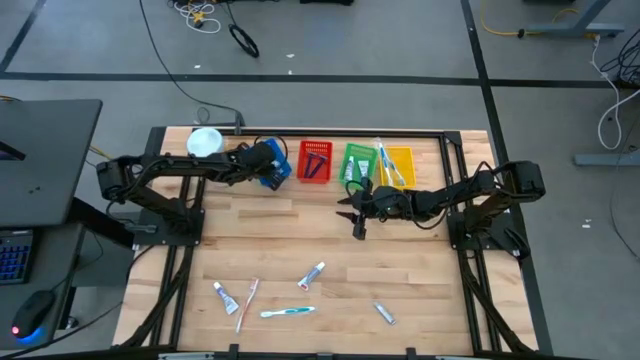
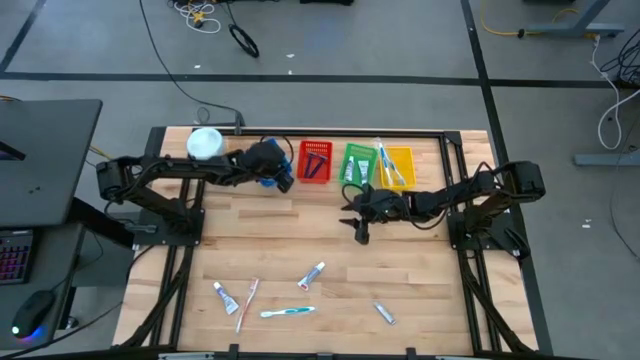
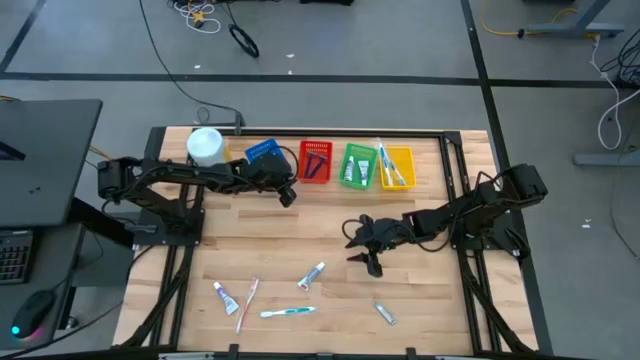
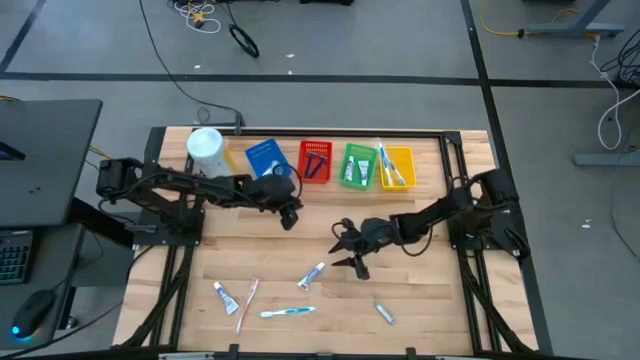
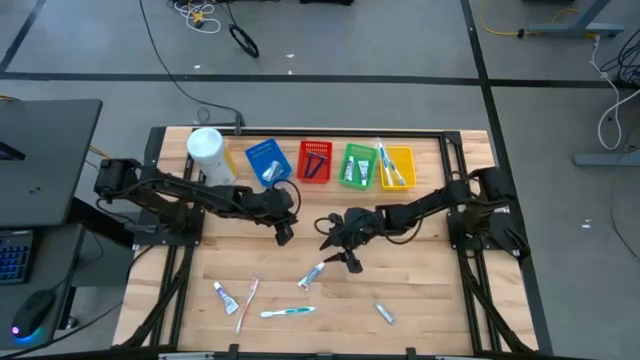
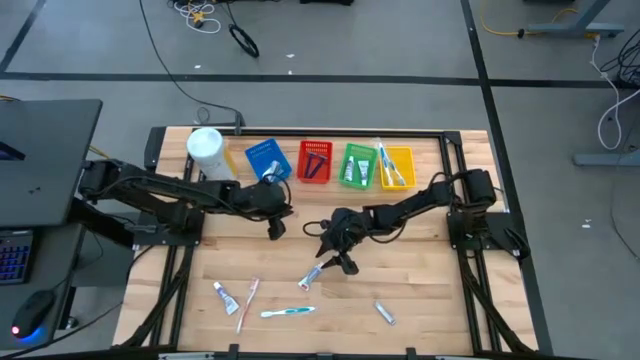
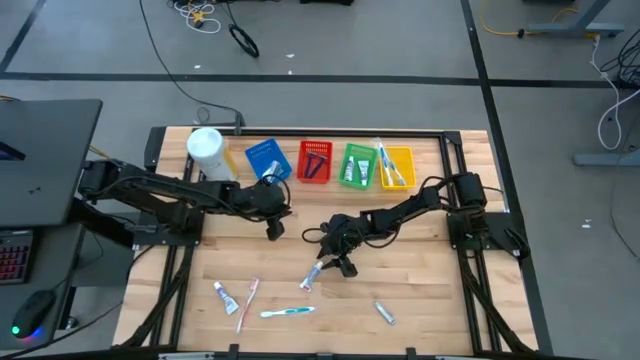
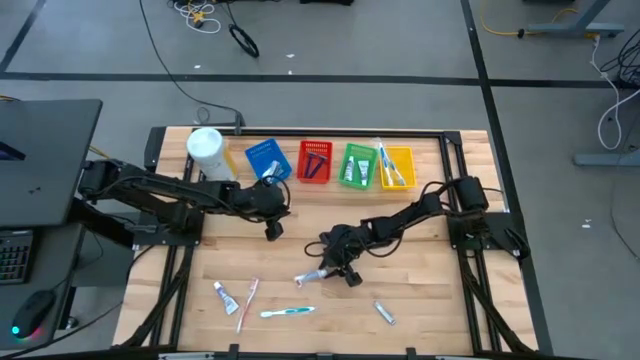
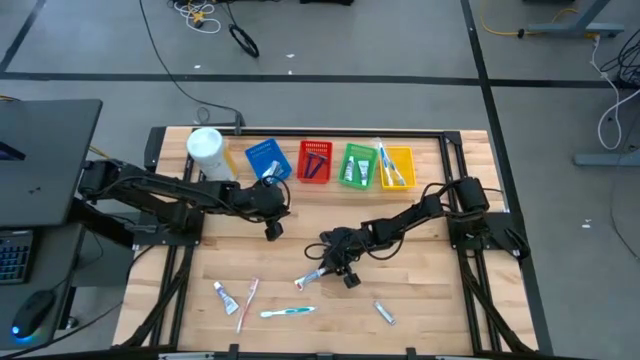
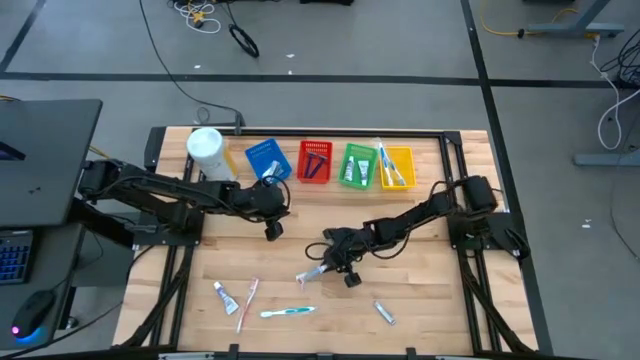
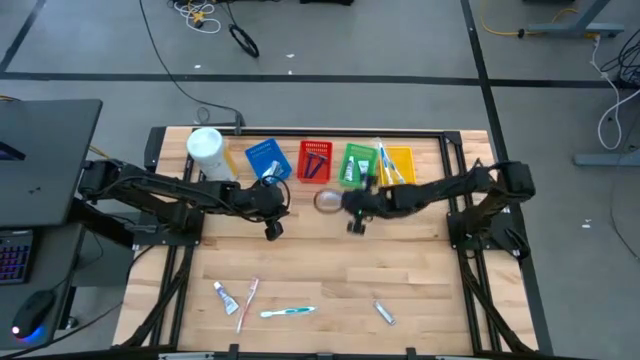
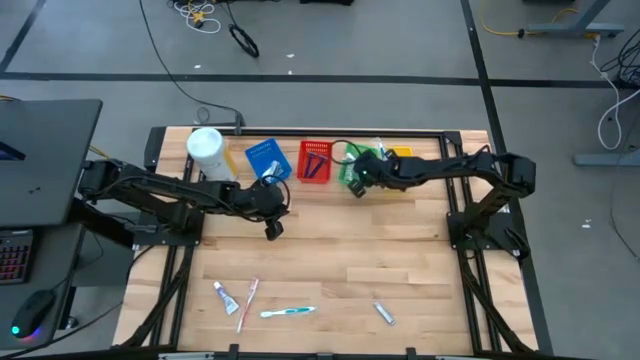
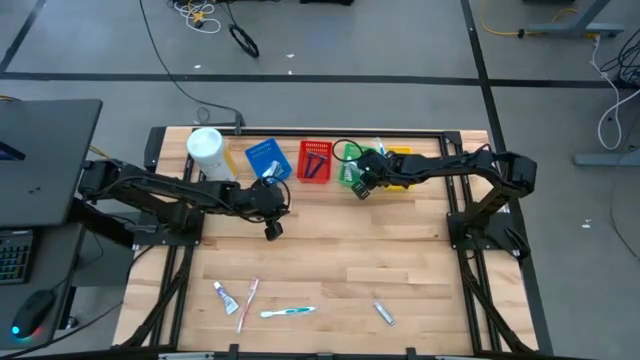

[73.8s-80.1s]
Task: Pick & Place Travel size toiletries
Put the white toothpaste into the green basket

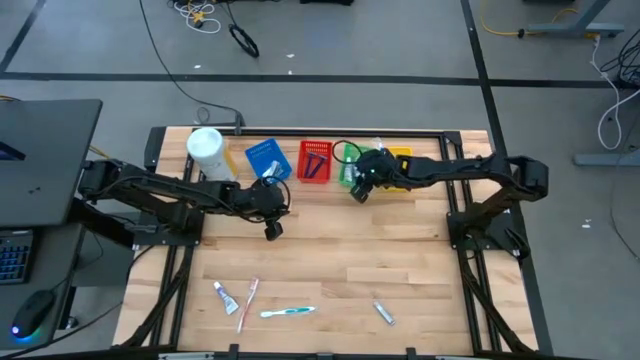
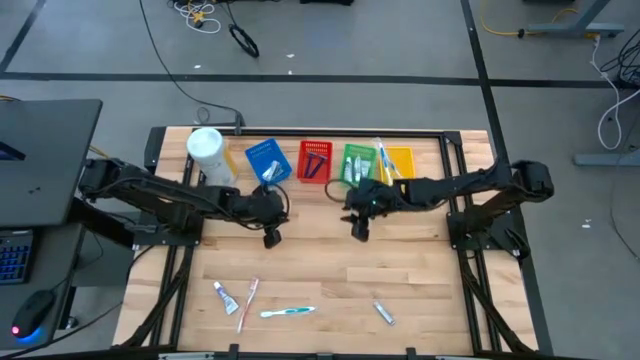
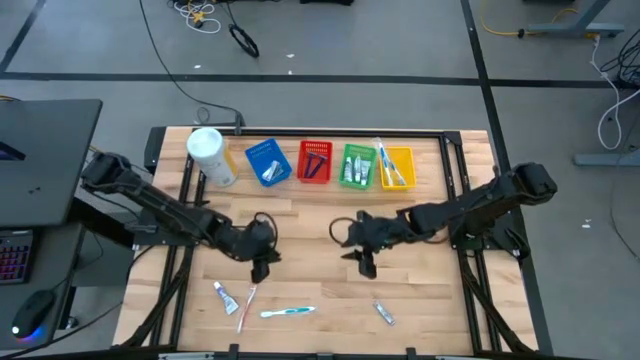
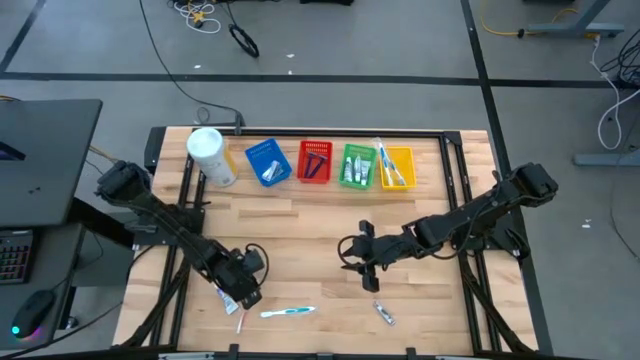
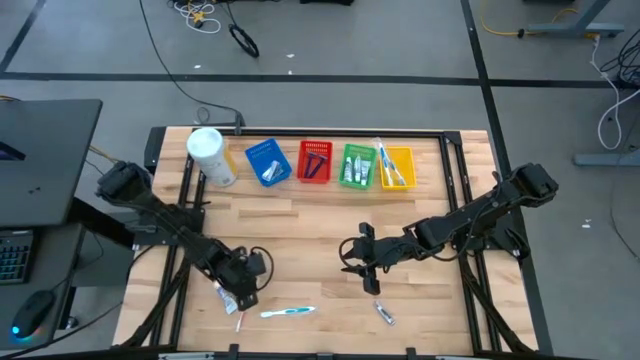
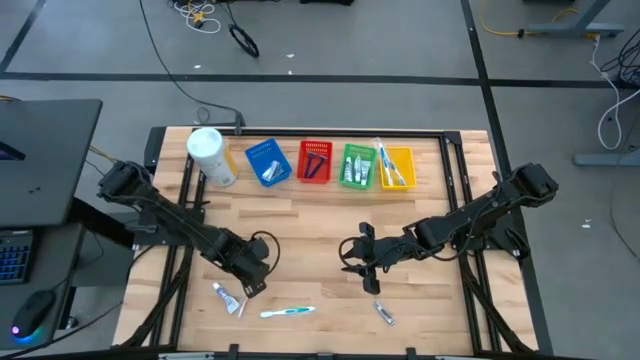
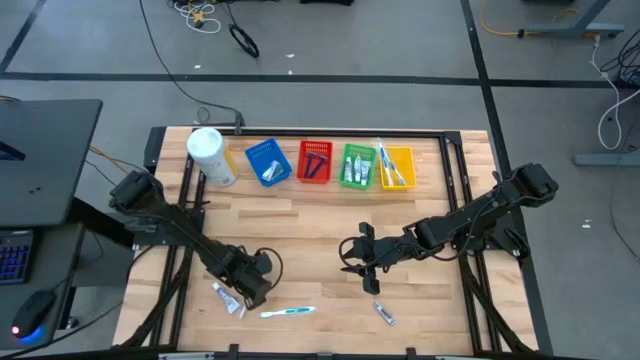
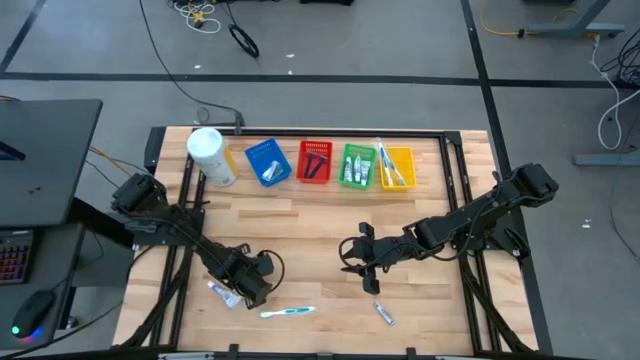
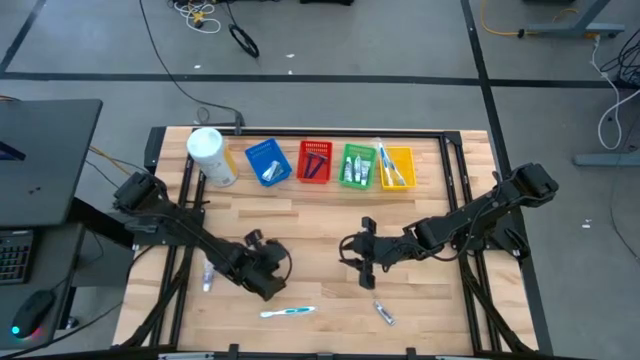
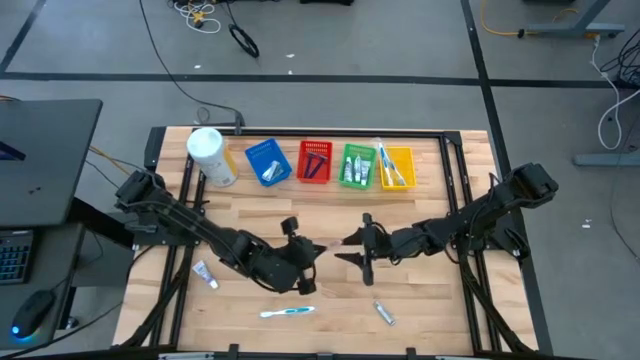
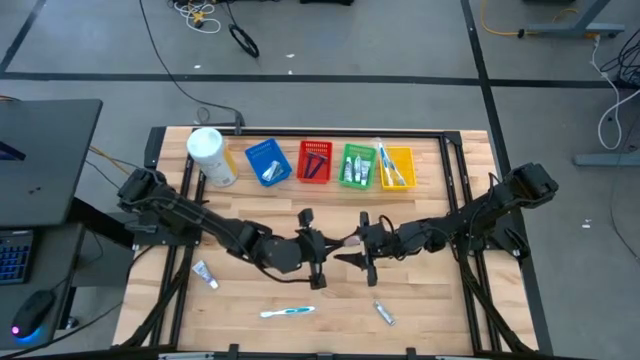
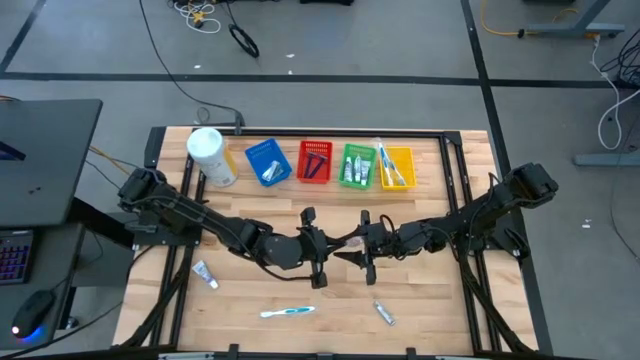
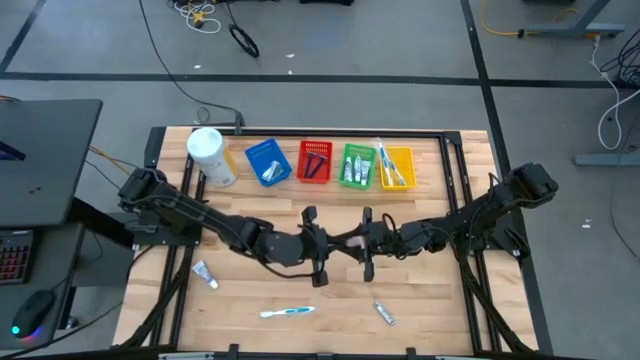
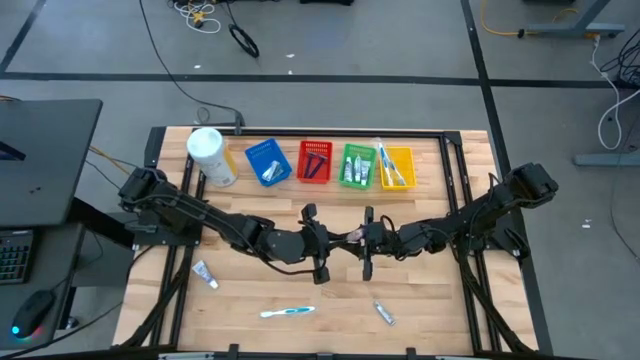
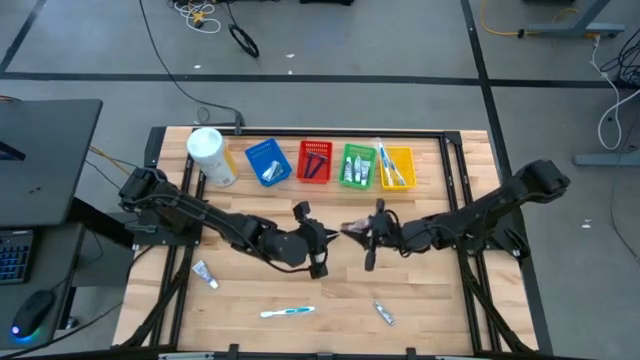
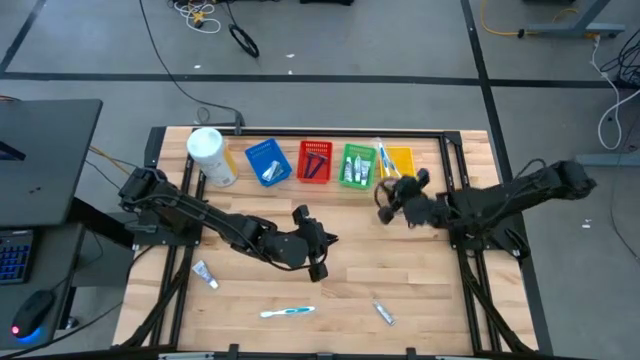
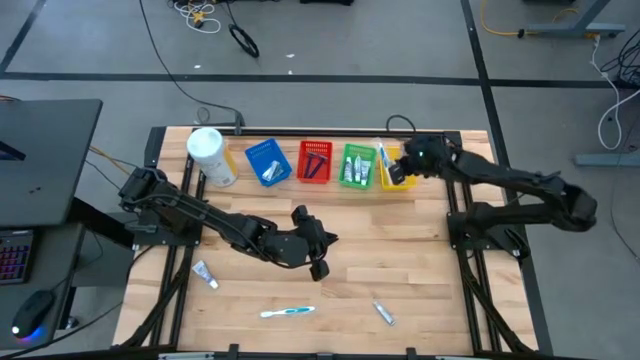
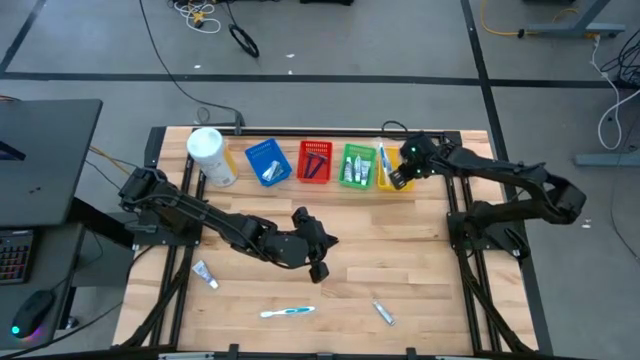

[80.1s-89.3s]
Put the orange toothbrush into the yellow basket

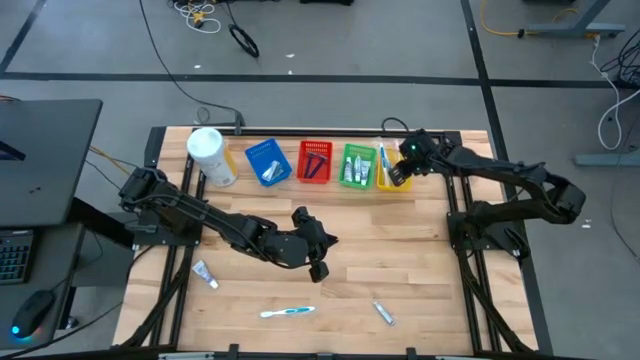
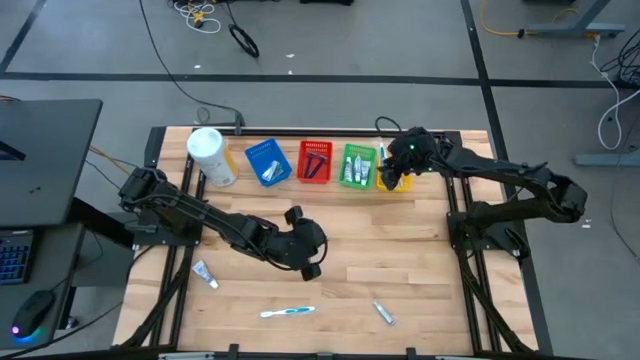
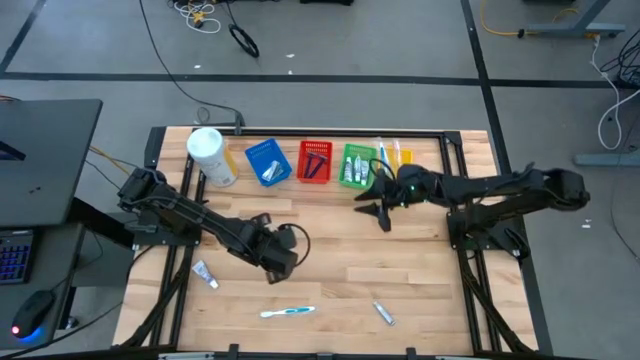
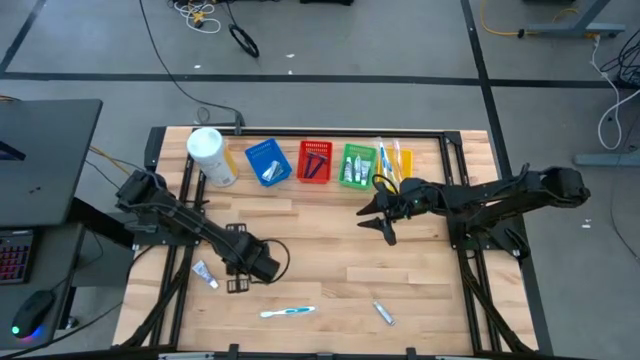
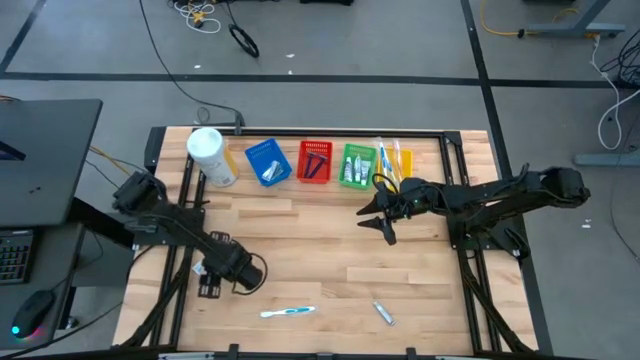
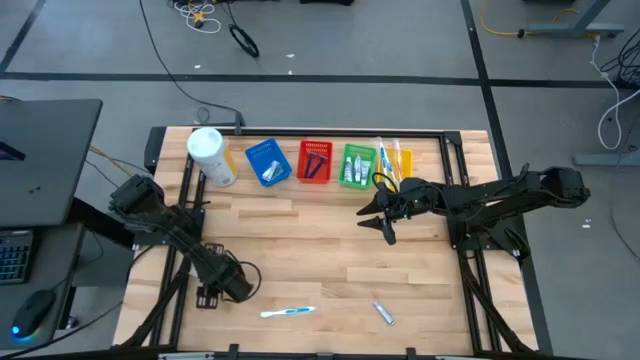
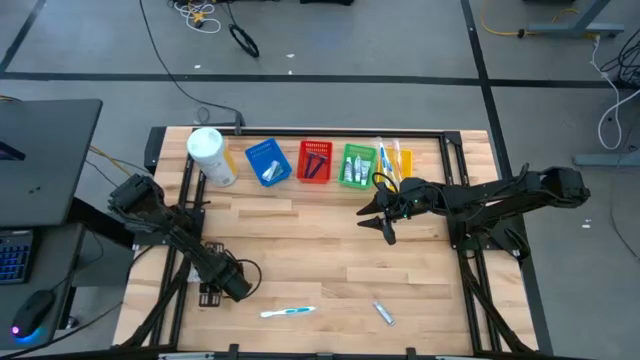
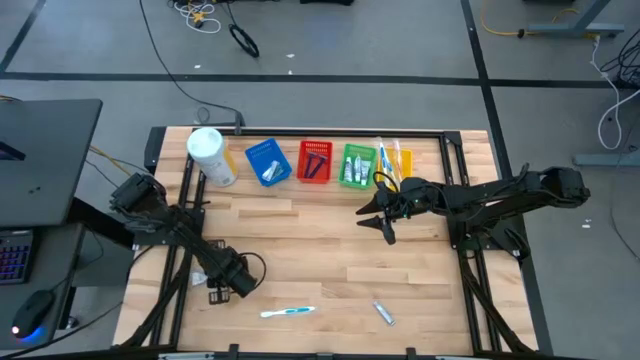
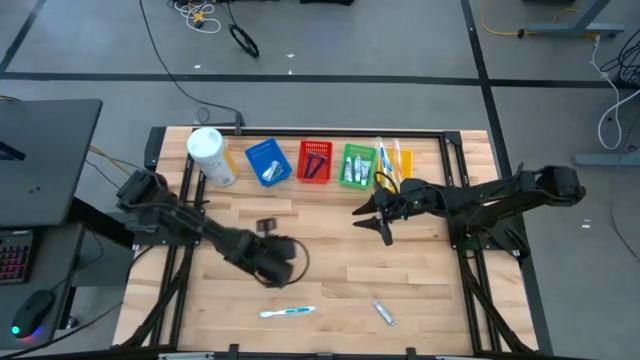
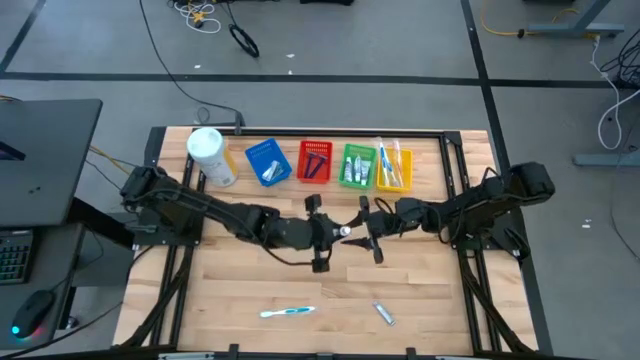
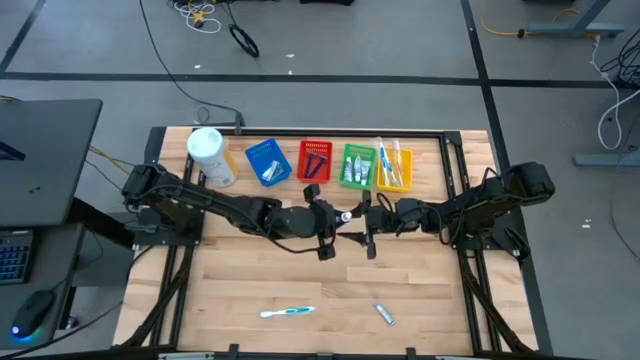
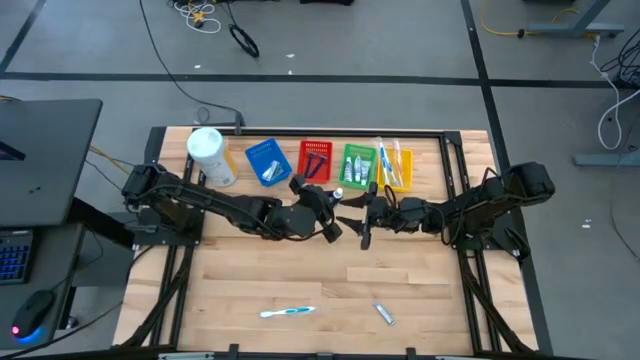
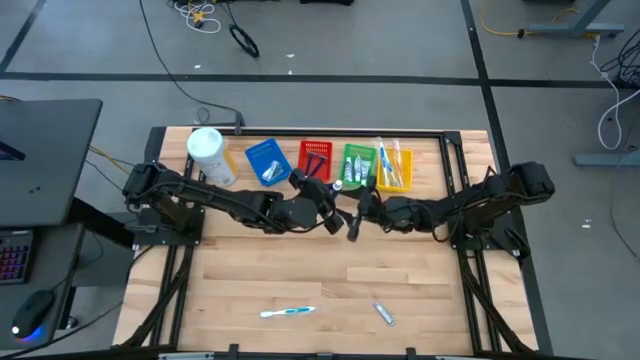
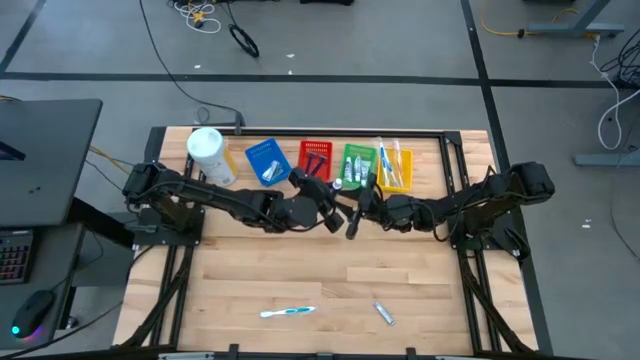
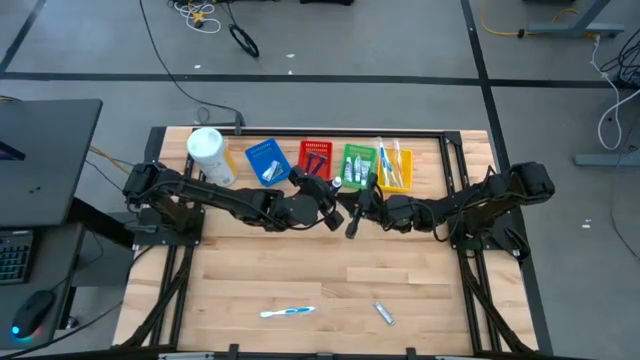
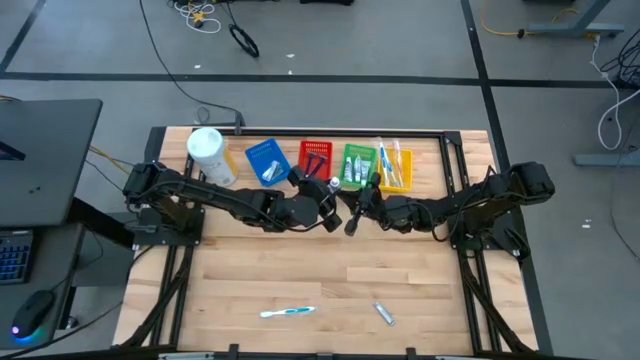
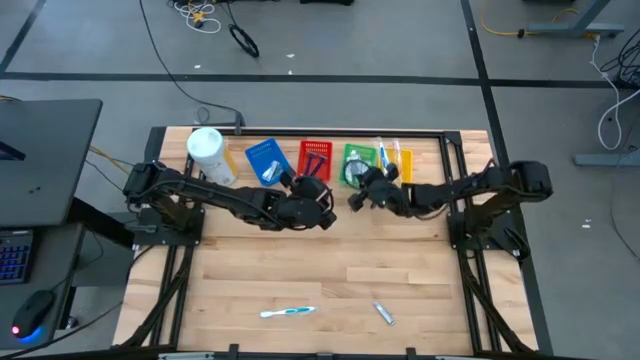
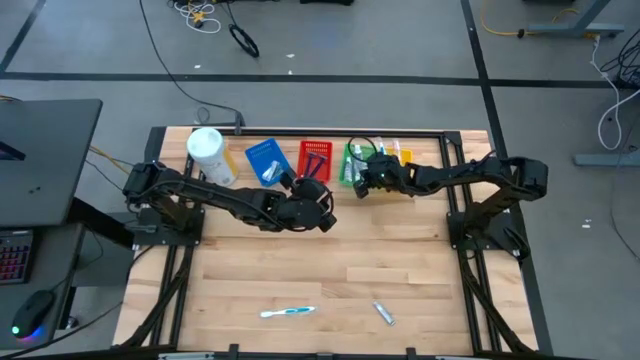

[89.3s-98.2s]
Put the white toothpaste into the green basket
